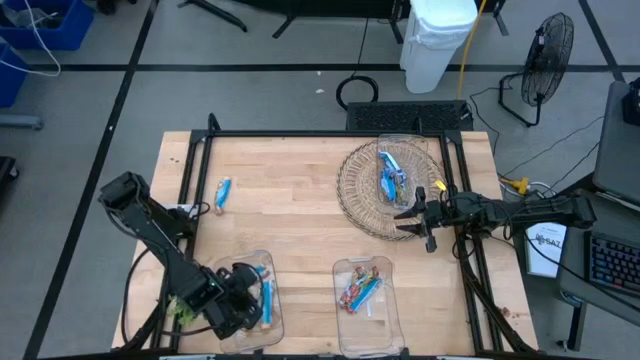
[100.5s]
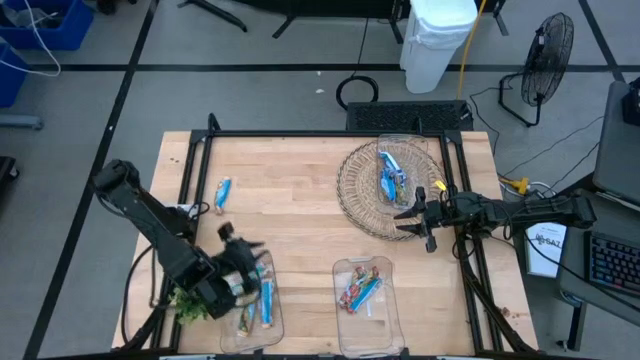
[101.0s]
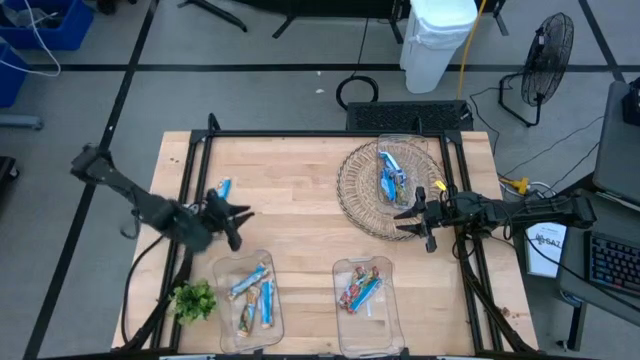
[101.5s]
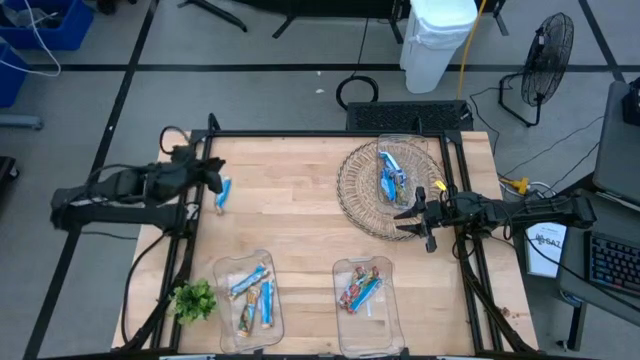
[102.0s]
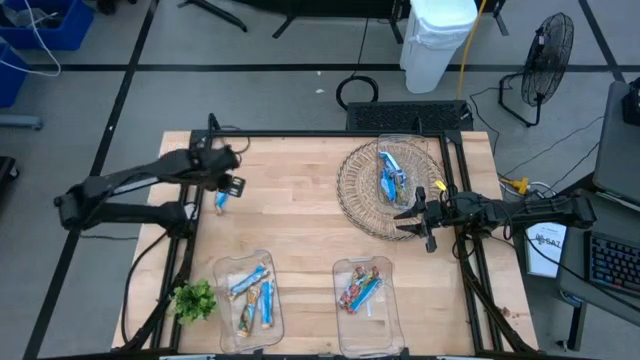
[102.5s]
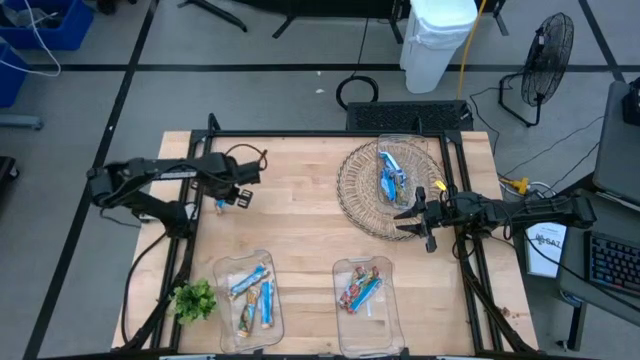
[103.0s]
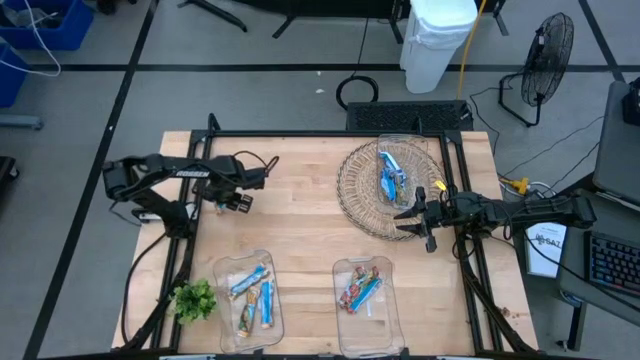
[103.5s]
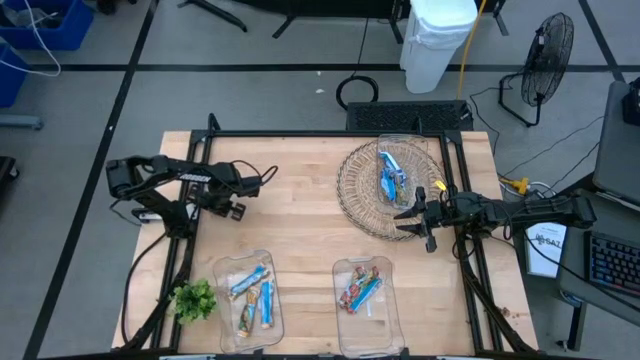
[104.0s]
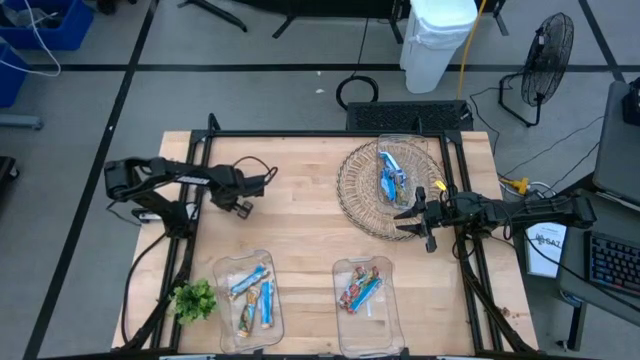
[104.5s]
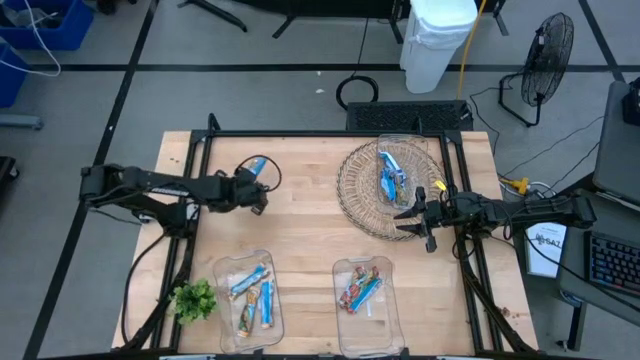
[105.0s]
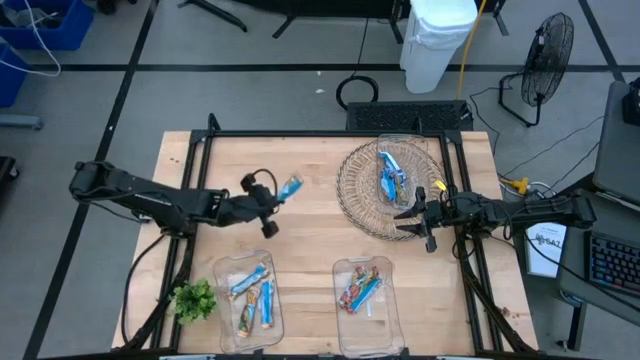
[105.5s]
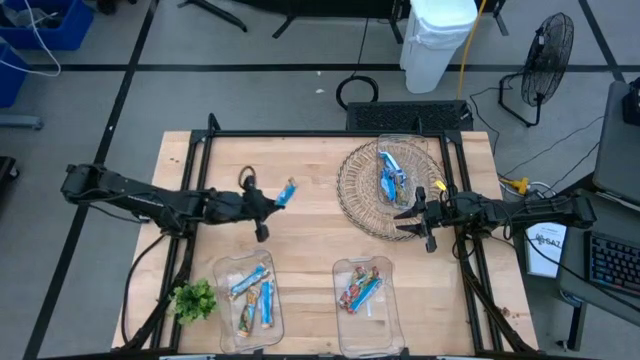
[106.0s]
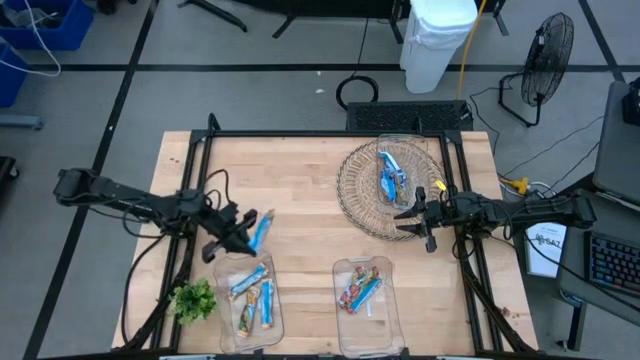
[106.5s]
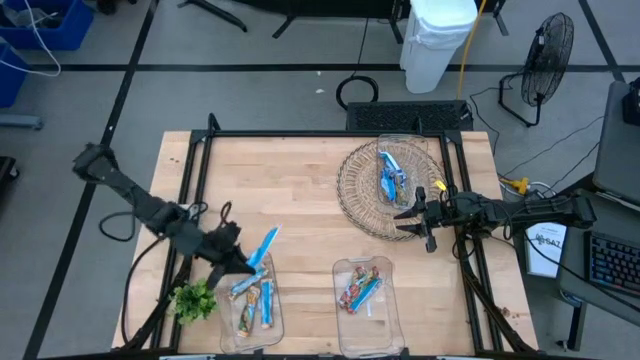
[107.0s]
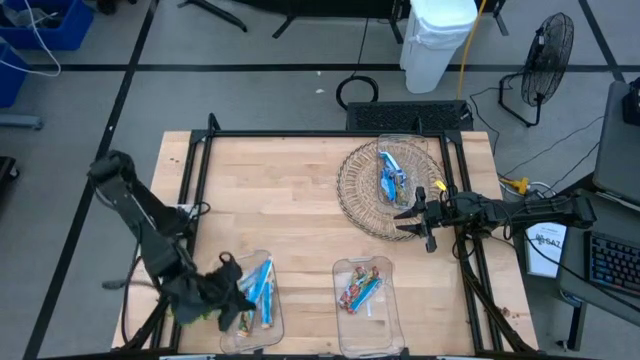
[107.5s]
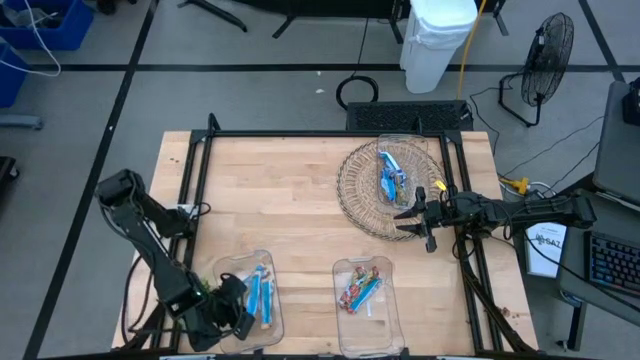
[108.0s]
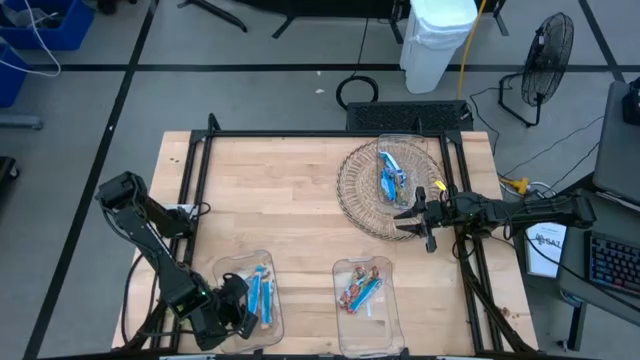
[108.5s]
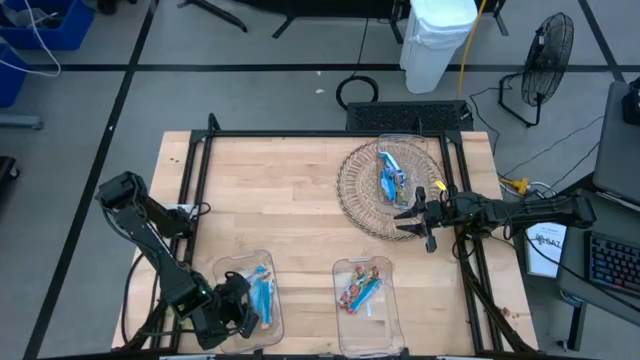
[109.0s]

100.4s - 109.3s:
Task: Pick and place Granola Bars by type
Put the orange granola bar into the bottom left transparent bin

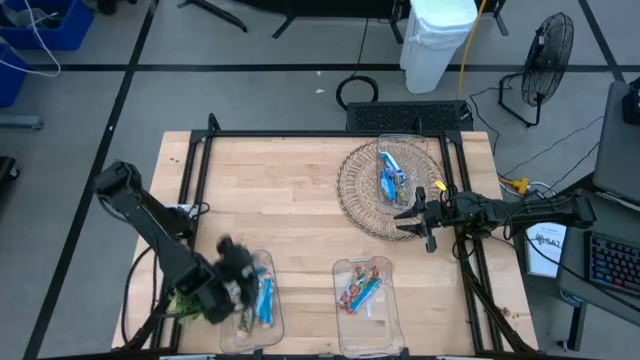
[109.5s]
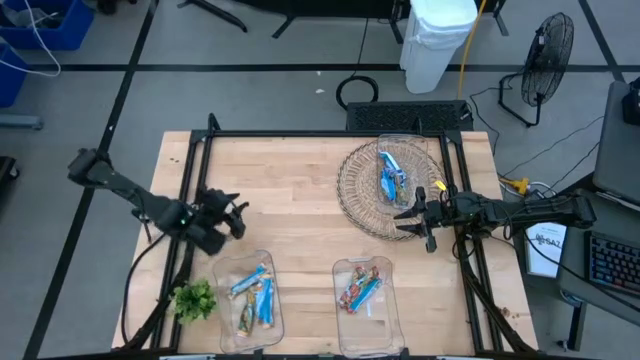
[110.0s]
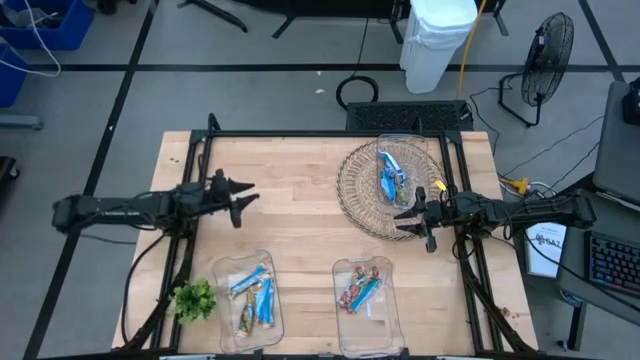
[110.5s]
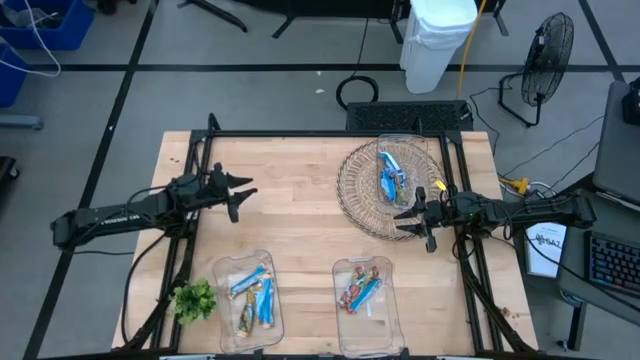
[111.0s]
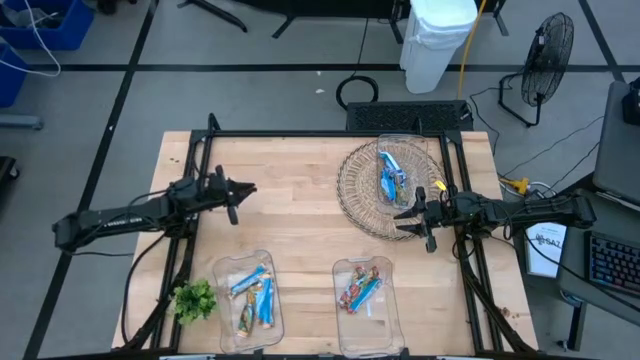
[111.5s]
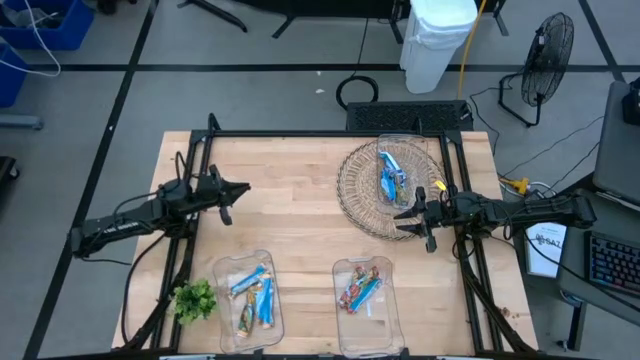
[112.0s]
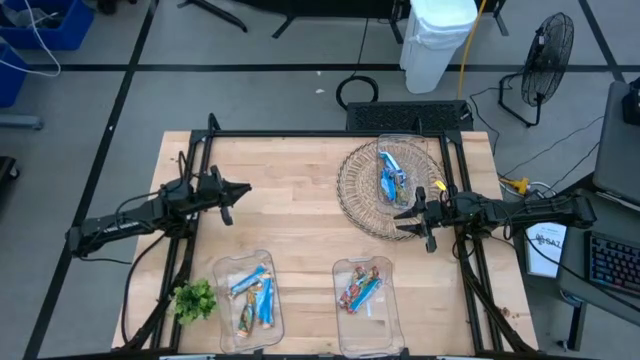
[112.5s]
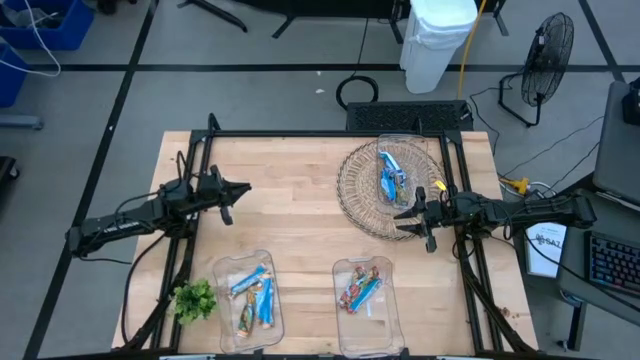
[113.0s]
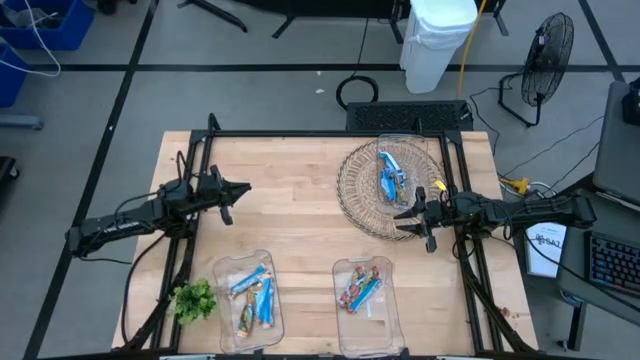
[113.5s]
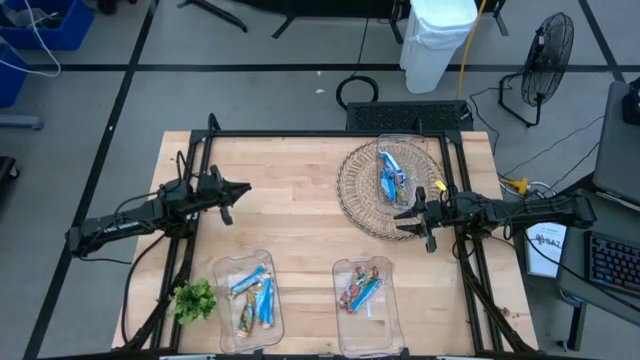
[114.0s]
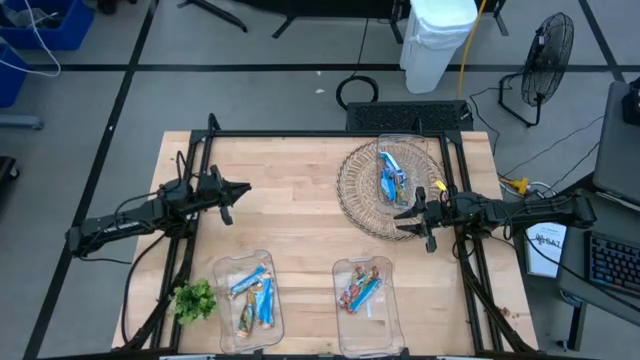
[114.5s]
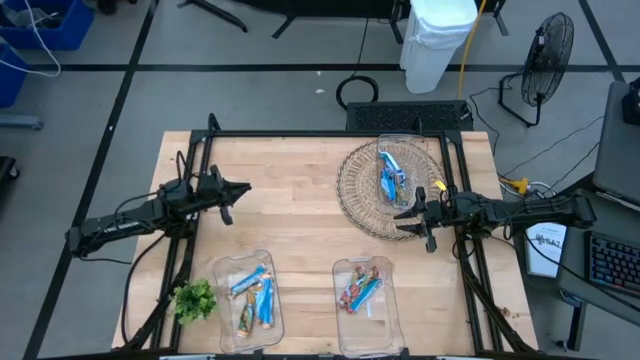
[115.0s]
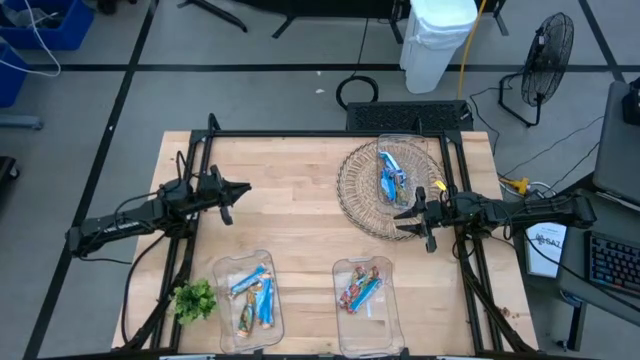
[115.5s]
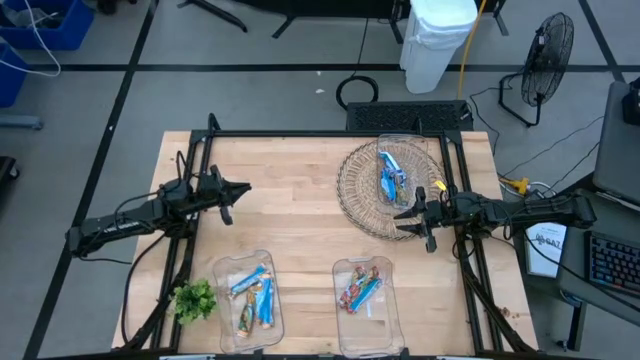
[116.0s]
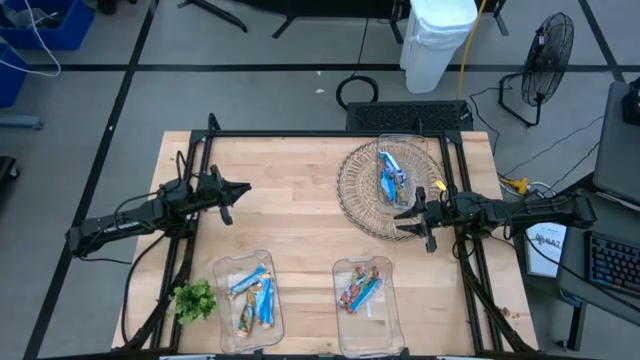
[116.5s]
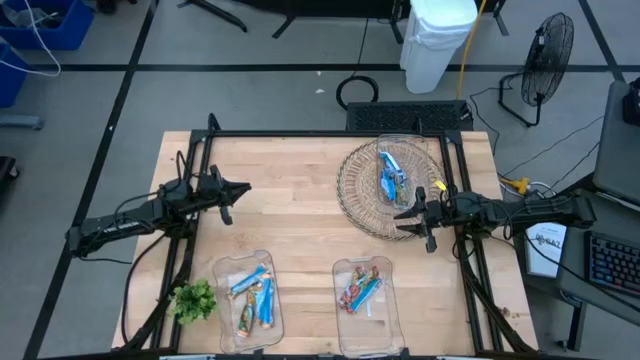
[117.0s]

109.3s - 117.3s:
Return to Home Position

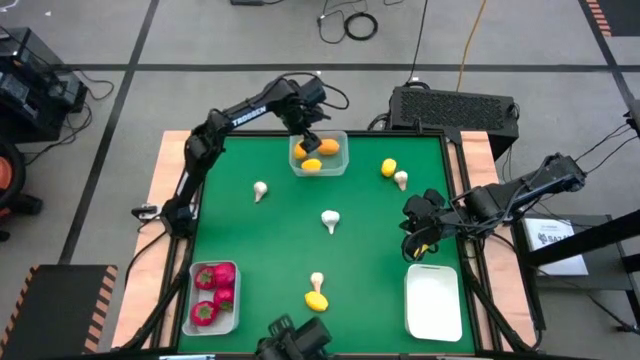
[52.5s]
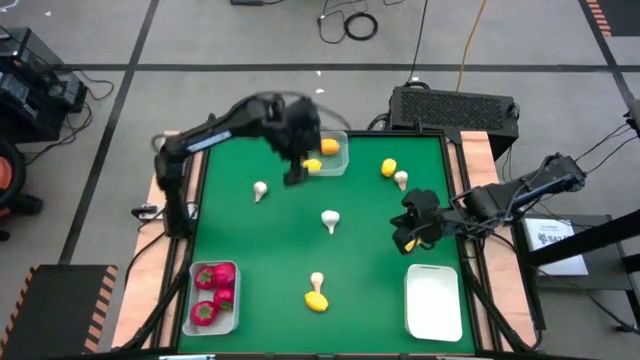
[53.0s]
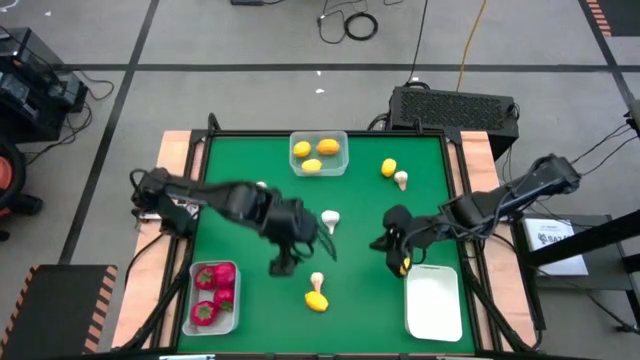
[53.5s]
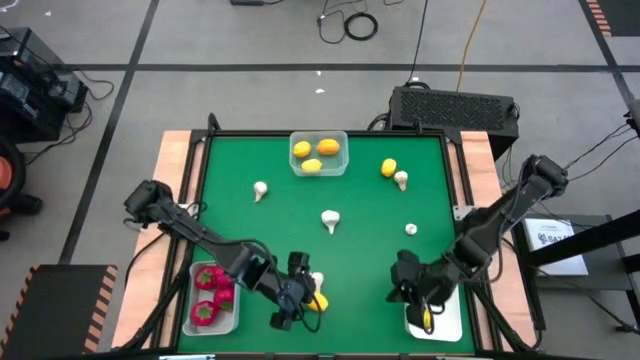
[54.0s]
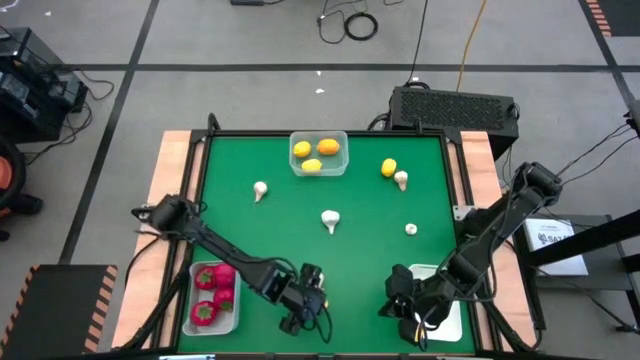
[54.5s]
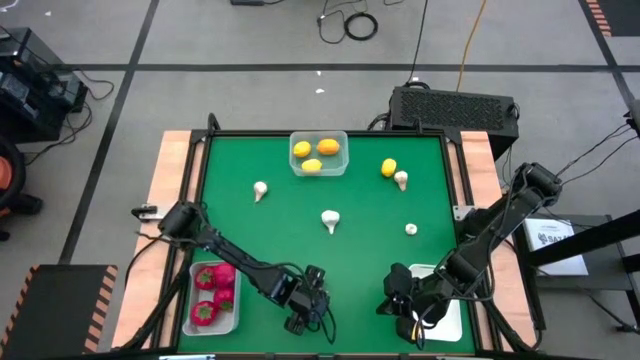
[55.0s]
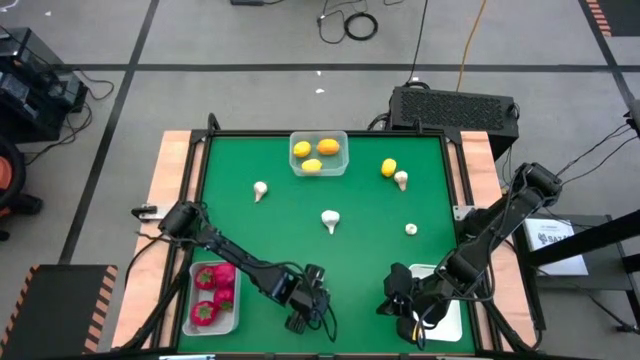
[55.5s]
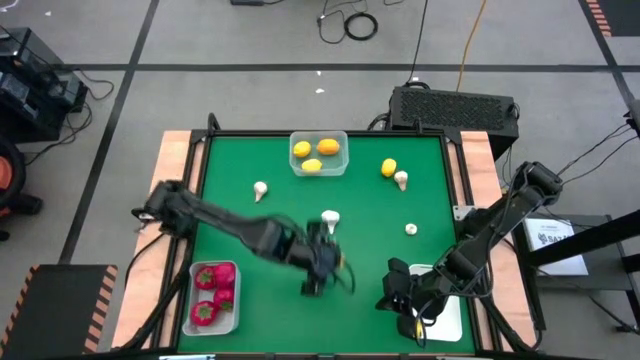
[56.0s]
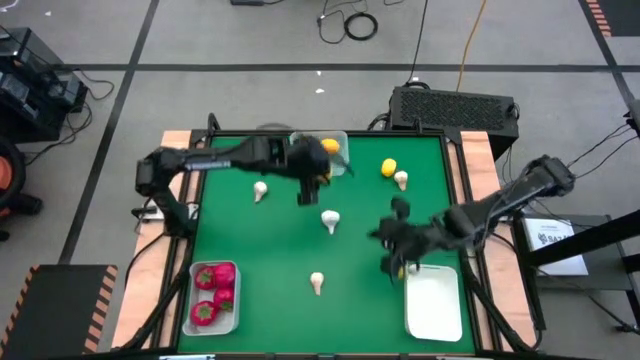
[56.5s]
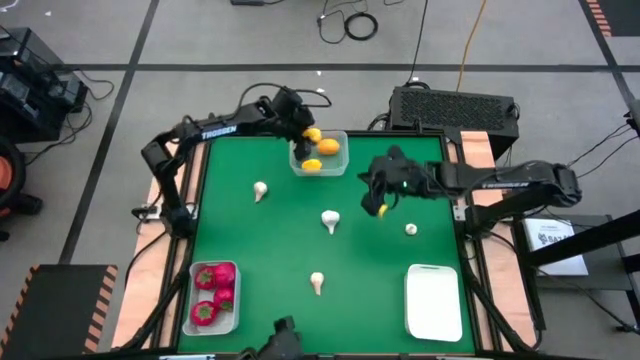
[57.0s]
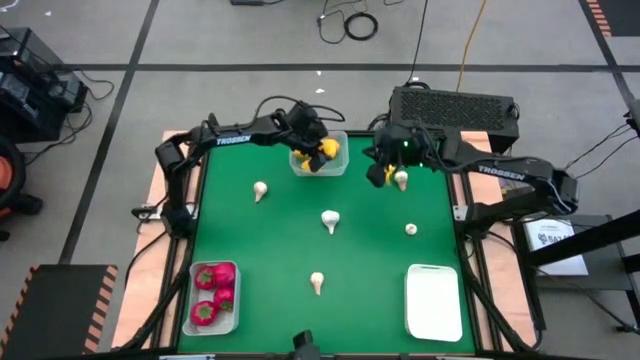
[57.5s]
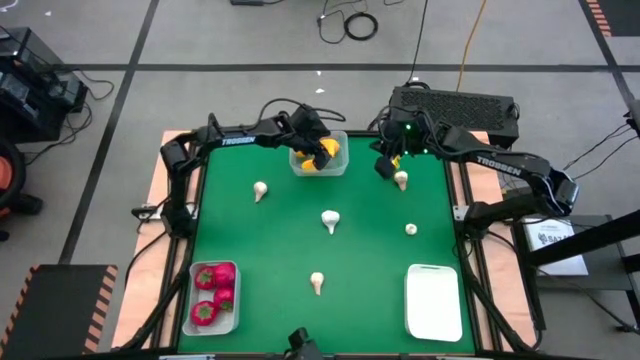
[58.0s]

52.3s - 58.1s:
Task: Sort produce into baskets
Put the lemon into the transparent bin
